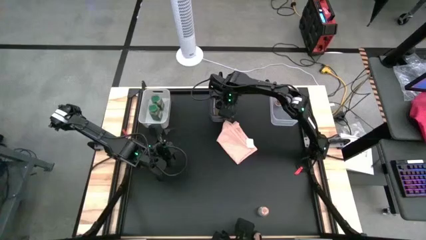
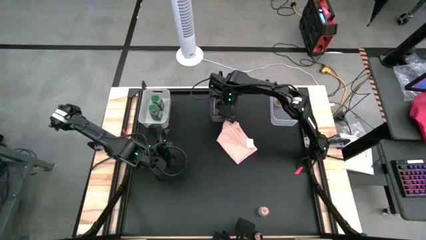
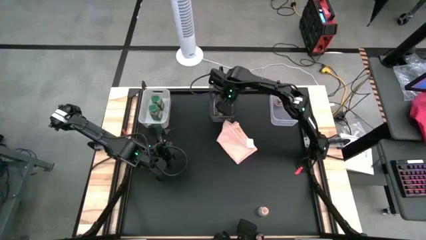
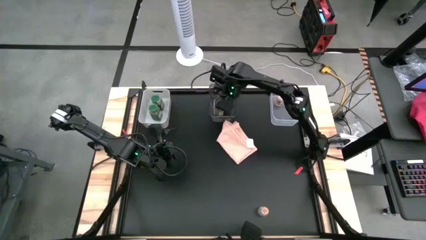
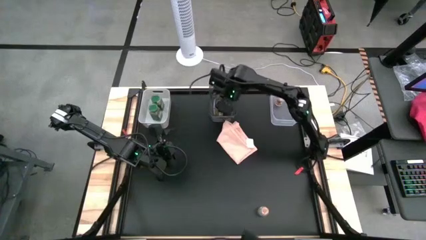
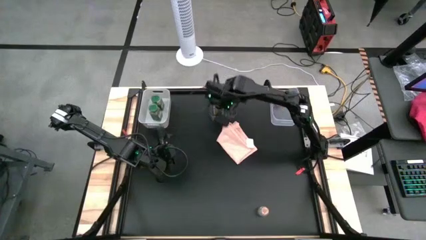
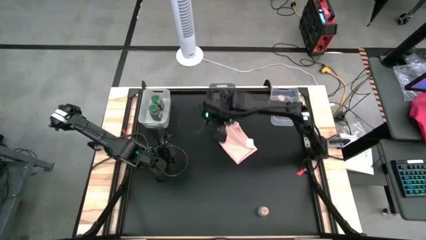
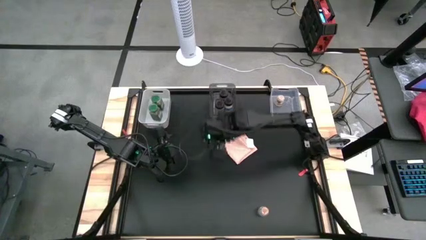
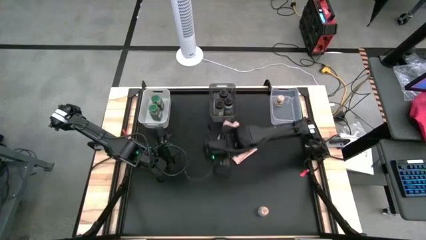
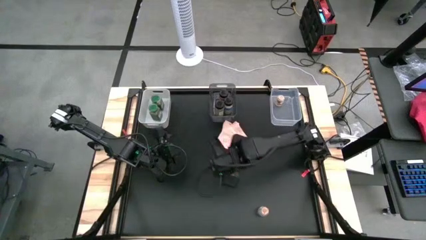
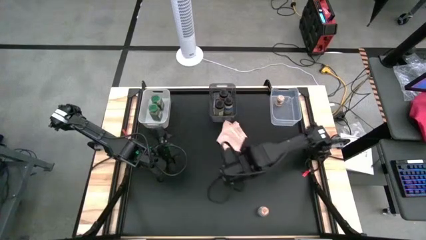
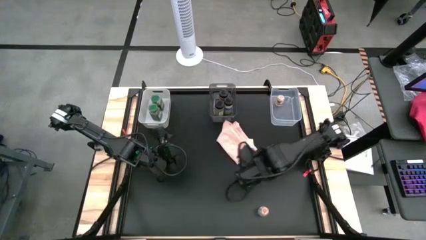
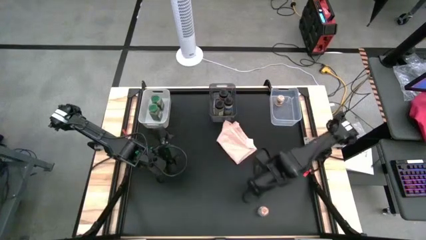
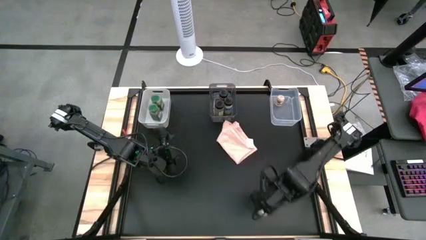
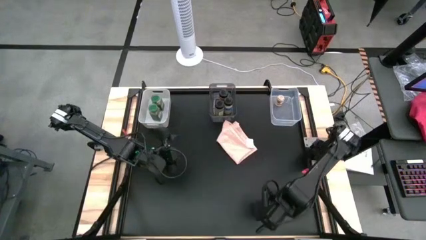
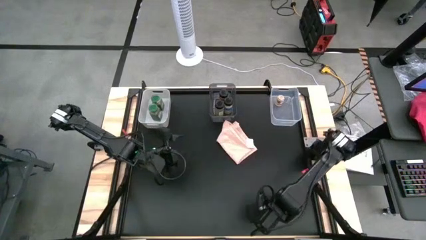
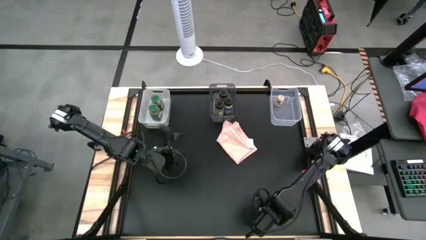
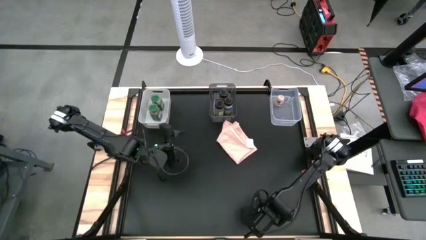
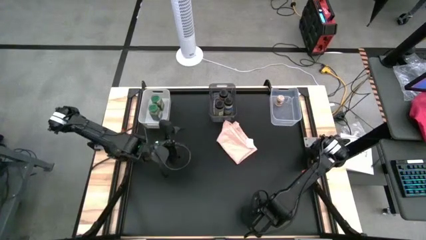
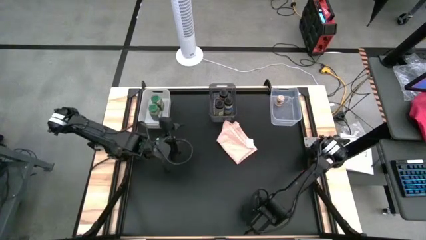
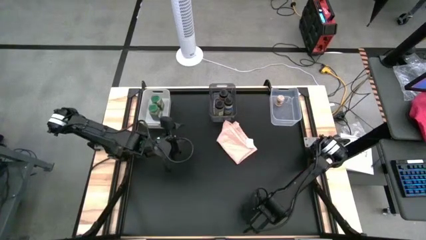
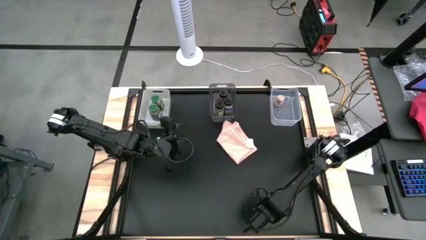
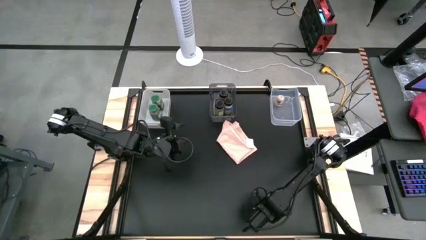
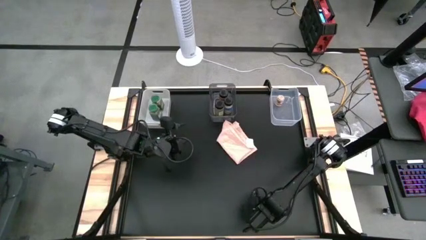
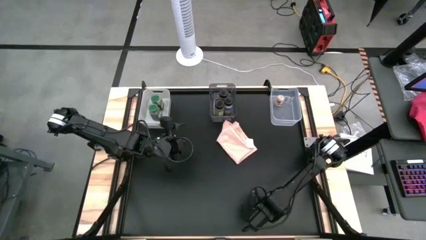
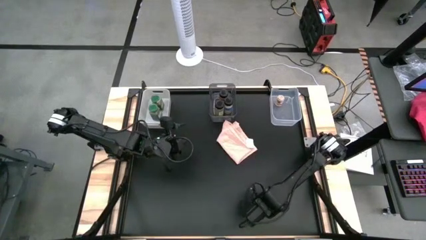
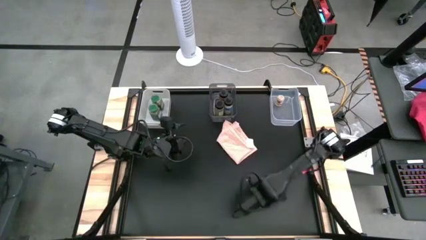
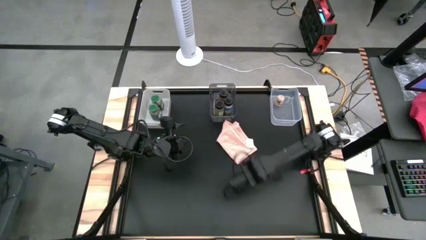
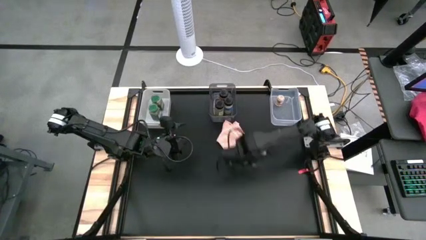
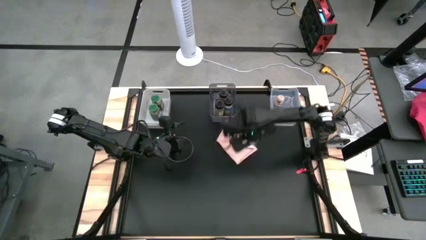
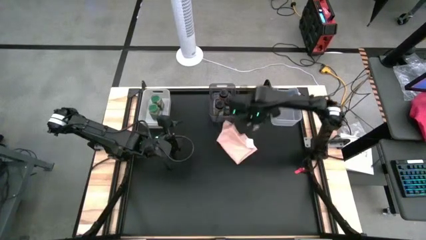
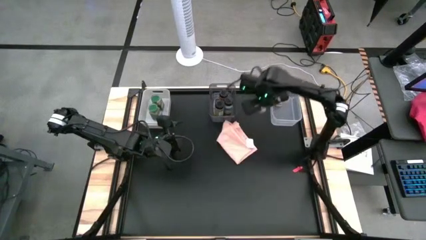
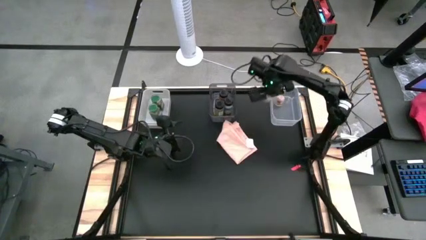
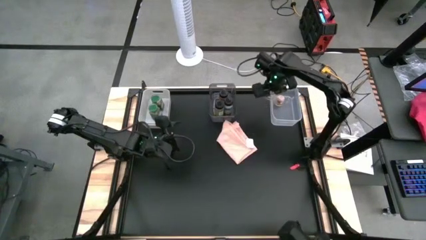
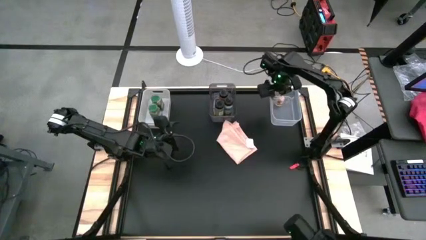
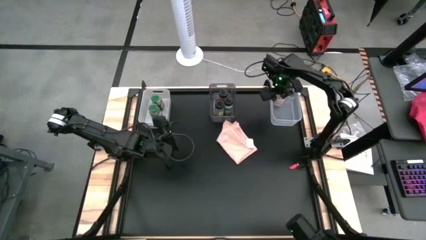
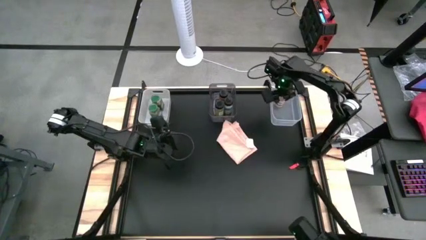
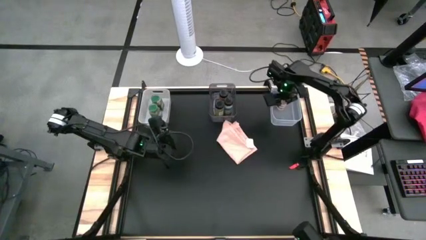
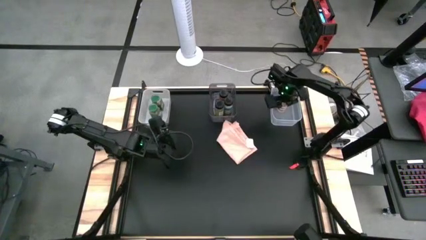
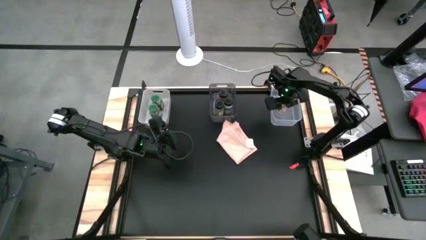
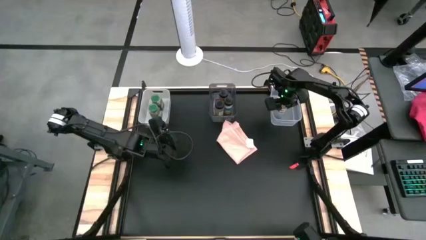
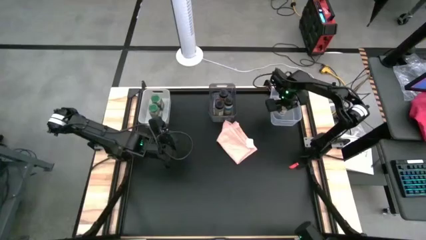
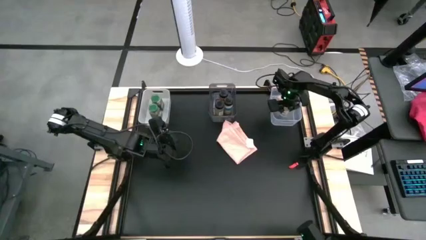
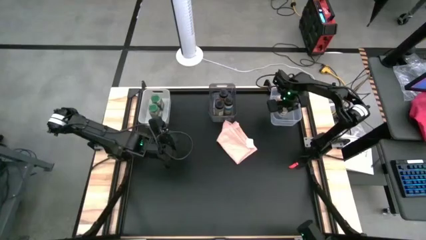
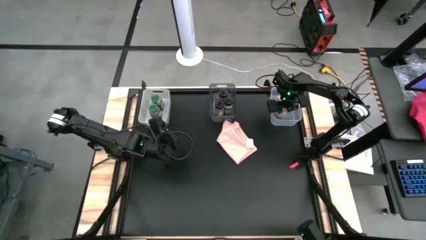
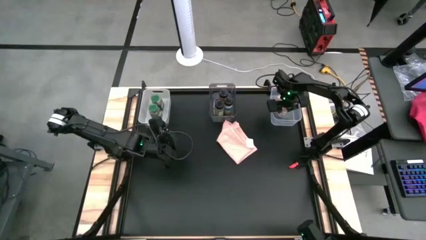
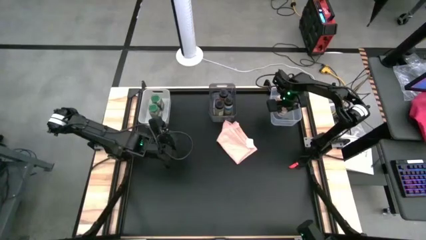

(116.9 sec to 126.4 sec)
Task: Sort spices by type
Put the brown seasoning bottle into the transparent bin
